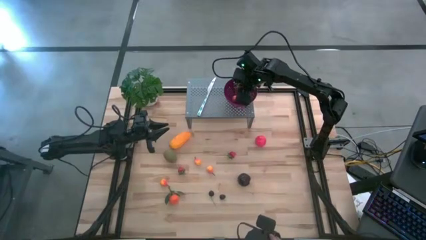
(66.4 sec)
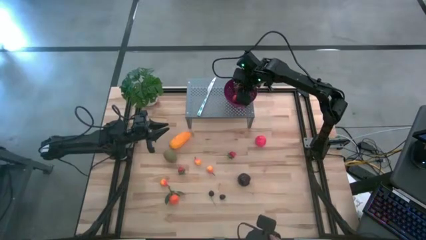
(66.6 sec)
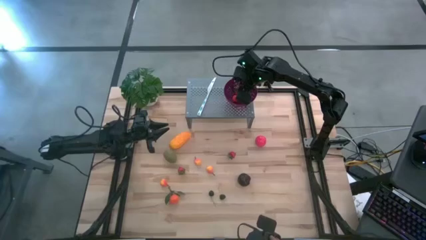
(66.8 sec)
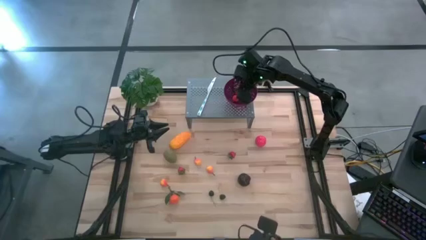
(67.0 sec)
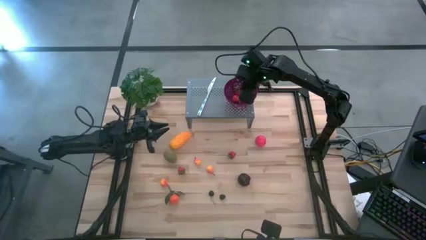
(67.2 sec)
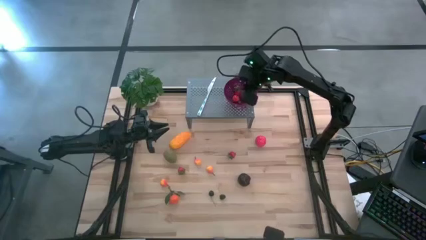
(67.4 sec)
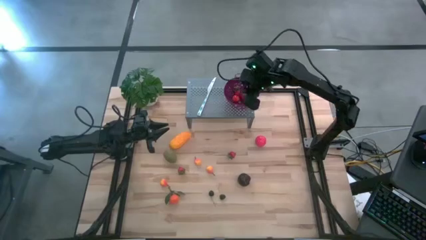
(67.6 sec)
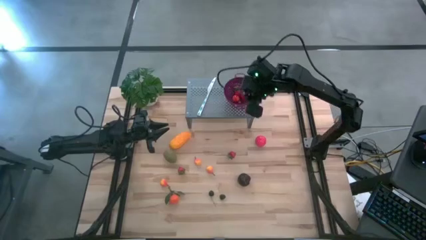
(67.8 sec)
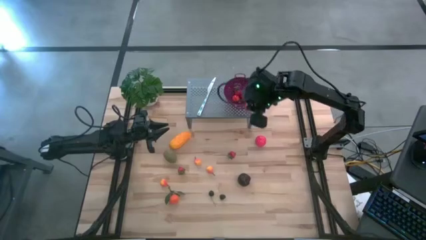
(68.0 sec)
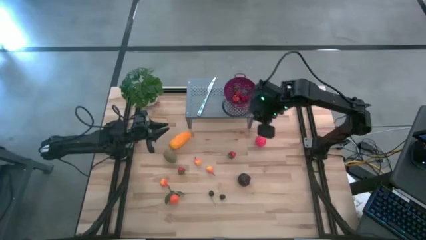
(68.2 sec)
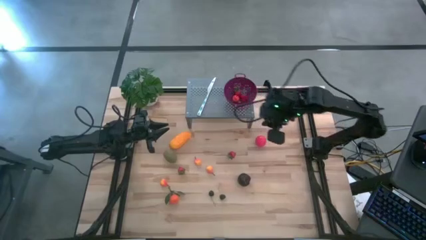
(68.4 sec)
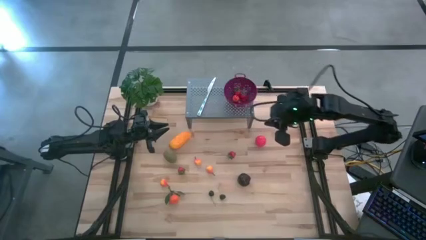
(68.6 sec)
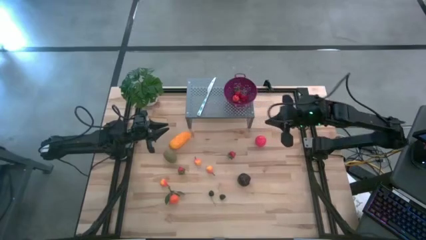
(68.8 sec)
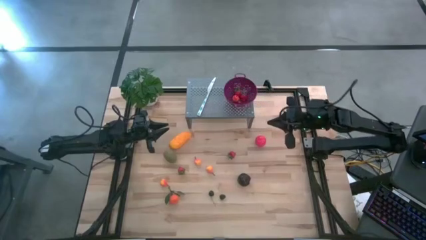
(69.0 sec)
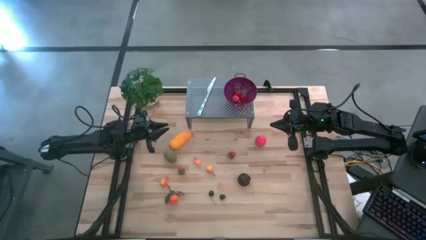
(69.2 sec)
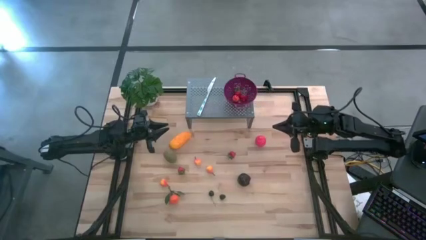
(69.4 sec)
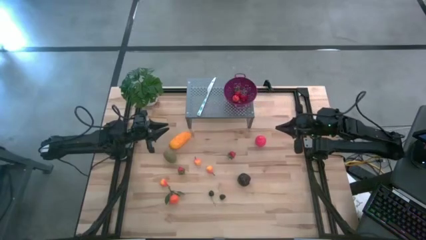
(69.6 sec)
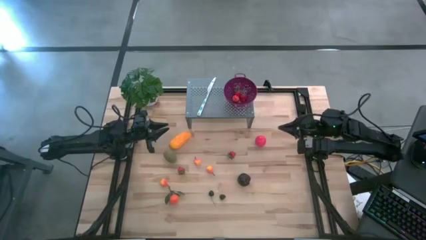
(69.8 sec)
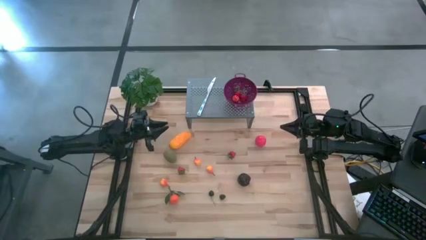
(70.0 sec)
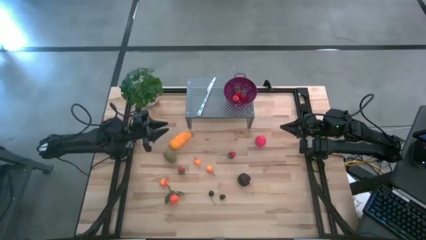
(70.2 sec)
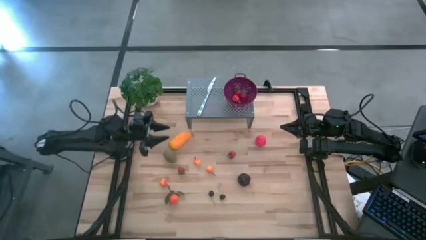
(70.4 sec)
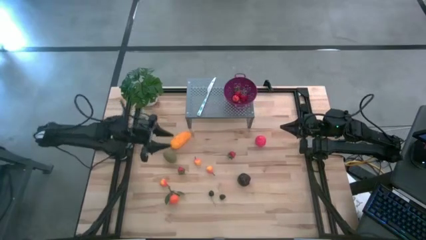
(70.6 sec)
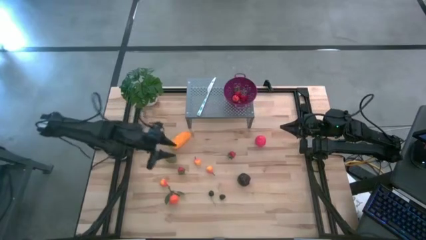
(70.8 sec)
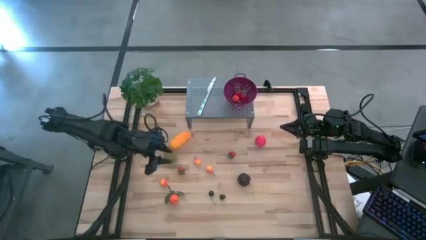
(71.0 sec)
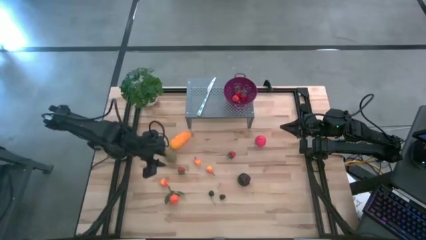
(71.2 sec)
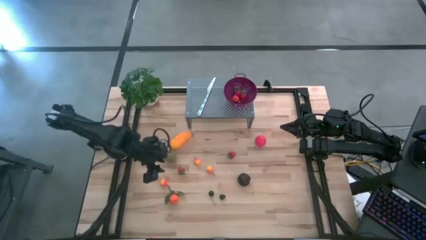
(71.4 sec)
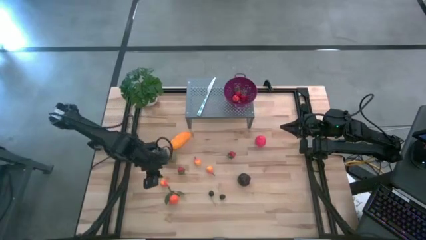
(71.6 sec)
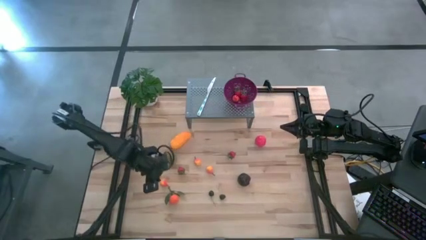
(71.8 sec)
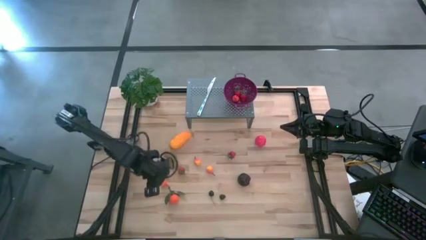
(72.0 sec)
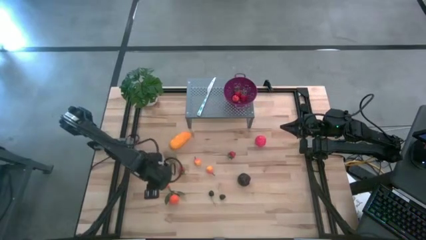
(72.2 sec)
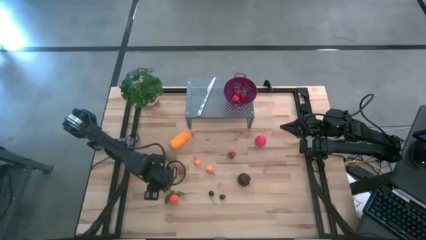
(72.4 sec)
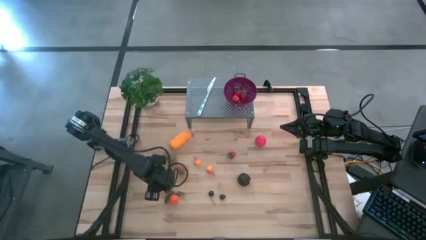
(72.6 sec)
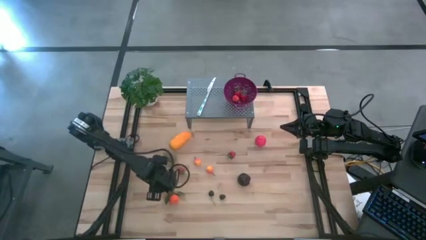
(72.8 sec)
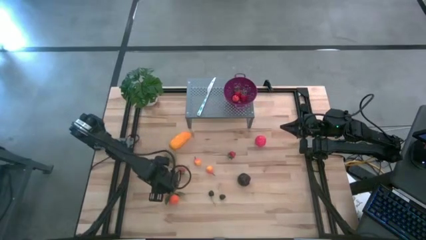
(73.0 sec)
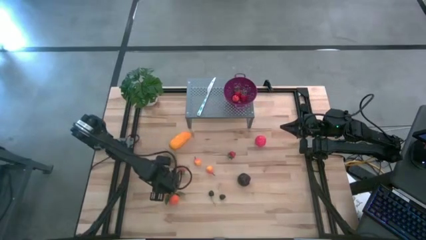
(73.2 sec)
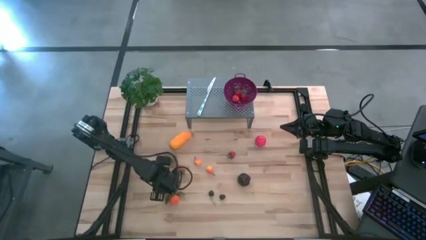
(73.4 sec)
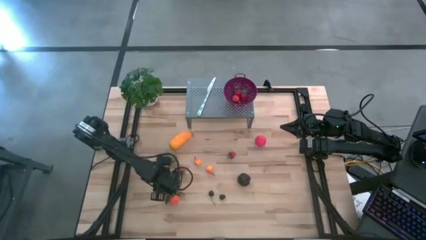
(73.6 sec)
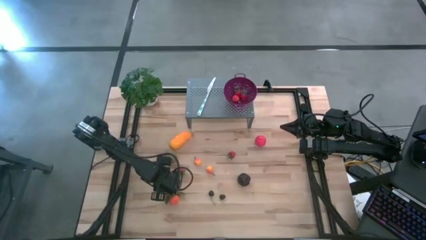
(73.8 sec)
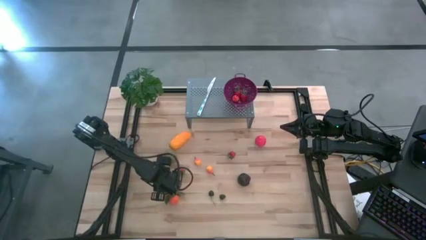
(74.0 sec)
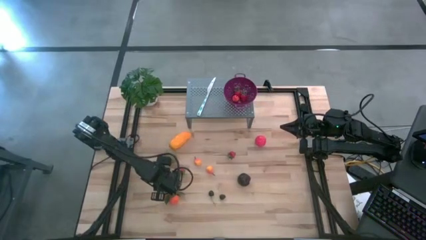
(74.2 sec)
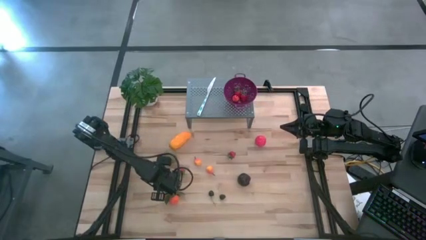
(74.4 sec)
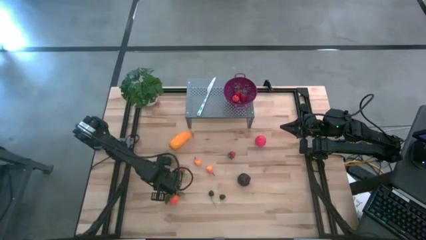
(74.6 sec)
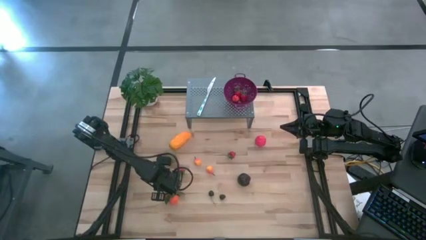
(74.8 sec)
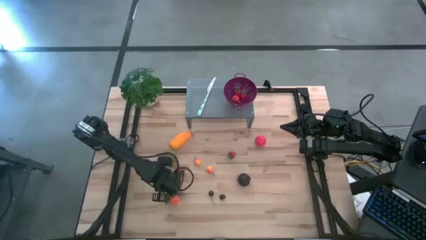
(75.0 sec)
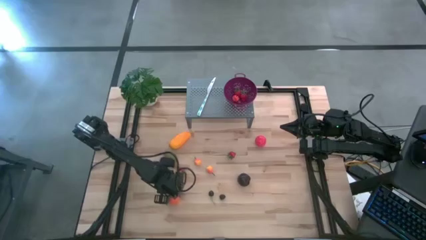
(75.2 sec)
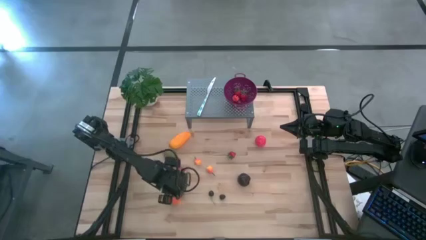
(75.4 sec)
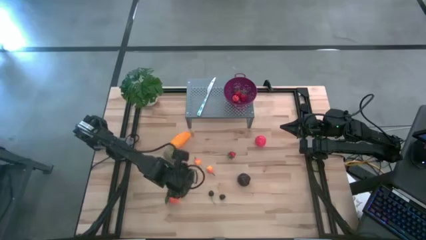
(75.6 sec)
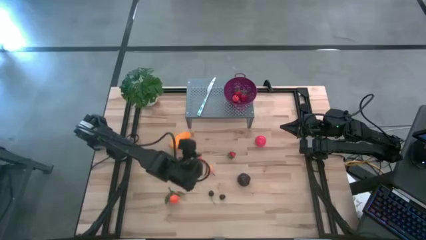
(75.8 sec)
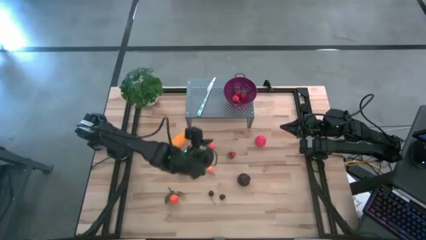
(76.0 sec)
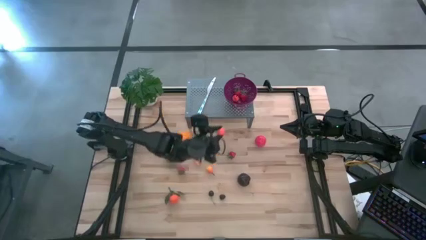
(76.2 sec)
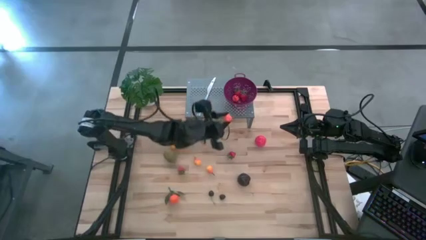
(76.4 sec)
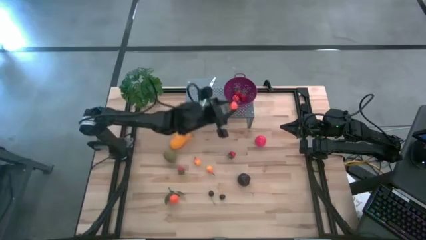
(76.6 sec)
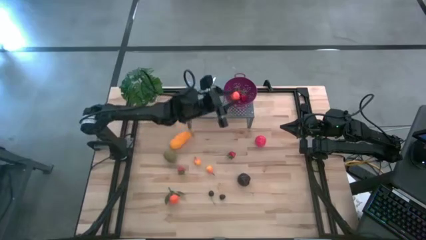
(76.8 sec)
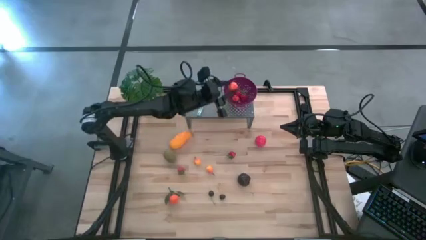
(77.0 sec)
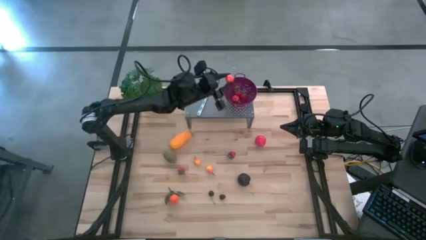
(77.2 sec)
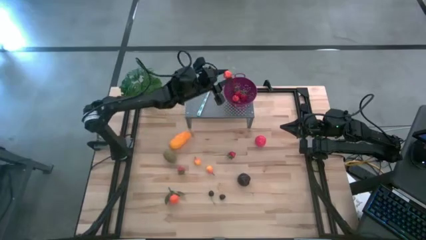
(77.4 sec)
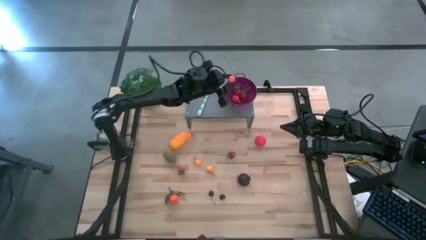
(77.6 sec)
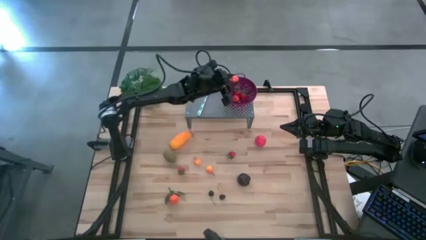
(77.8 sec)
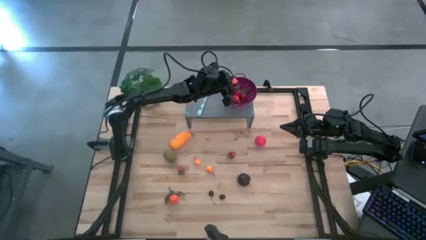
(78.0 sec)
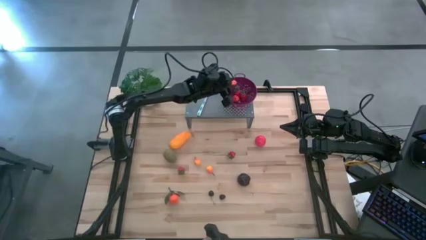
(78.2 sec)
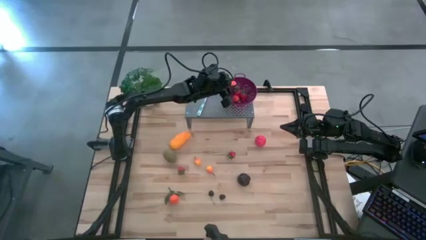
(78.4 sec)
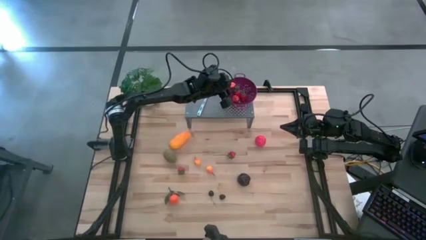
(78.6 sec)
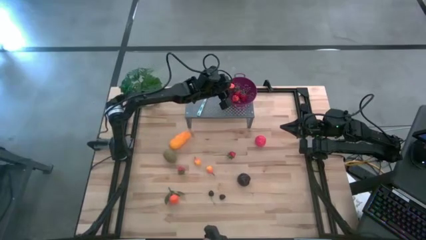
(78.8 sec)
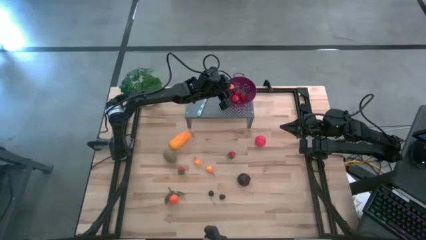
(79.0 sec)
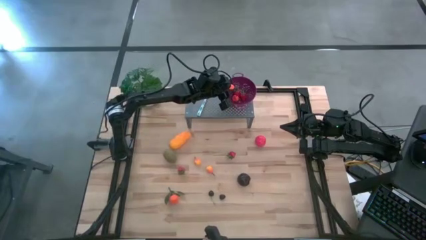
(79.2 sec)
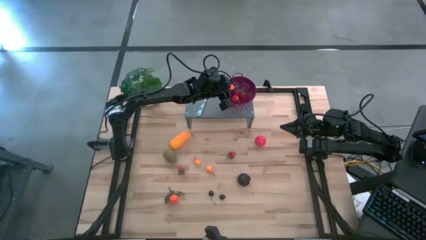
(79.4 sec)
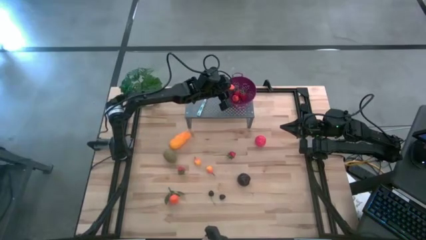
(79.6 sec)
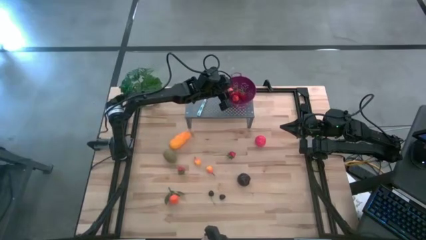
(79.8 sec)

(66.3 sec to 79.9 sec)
Task: Pick & Place Fruit
Put the orange pear into the violet strainer bowl on the shelf
